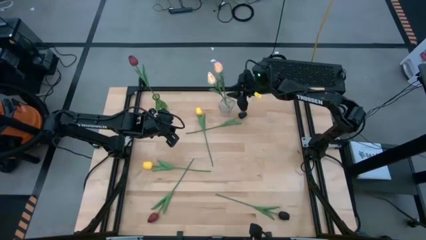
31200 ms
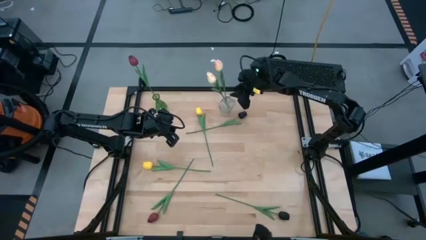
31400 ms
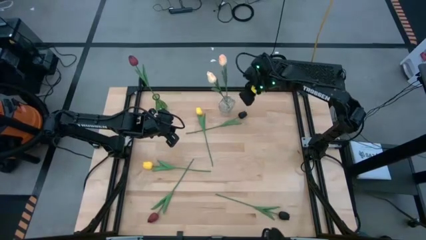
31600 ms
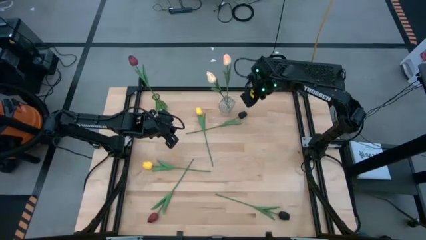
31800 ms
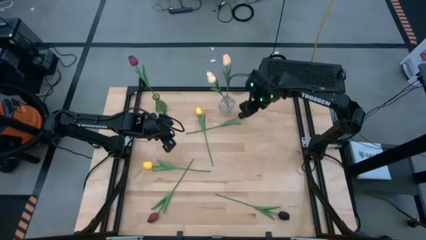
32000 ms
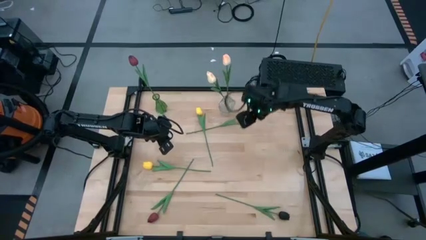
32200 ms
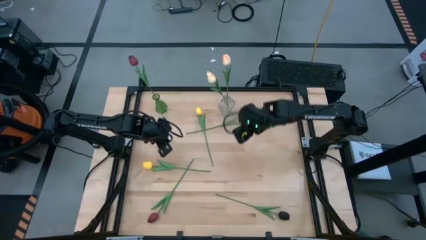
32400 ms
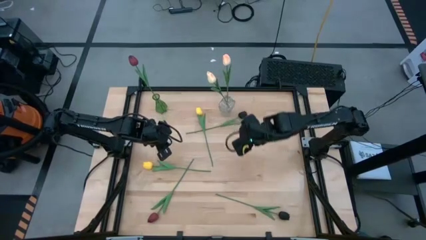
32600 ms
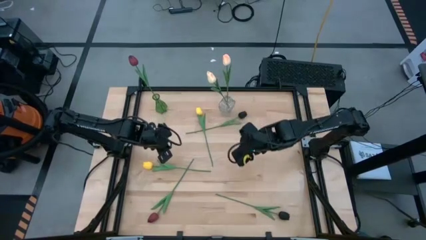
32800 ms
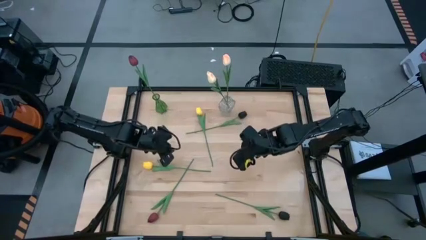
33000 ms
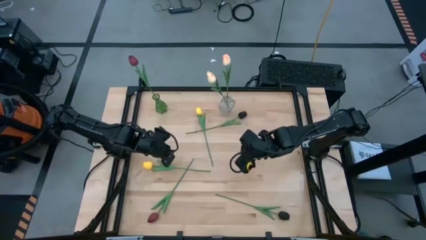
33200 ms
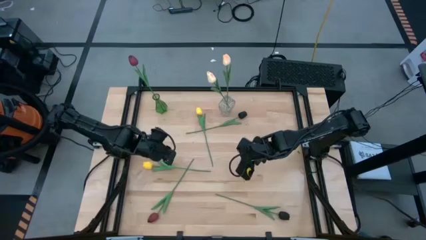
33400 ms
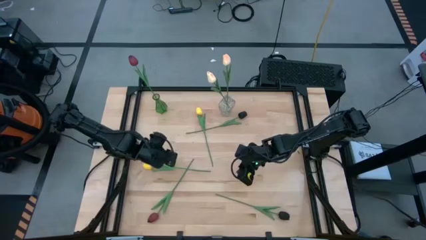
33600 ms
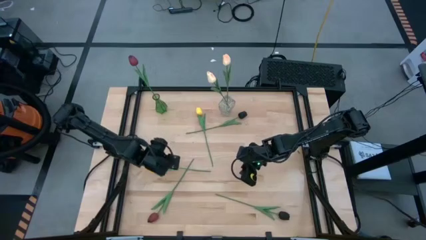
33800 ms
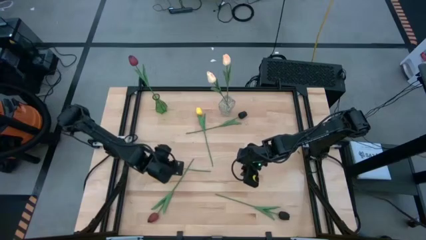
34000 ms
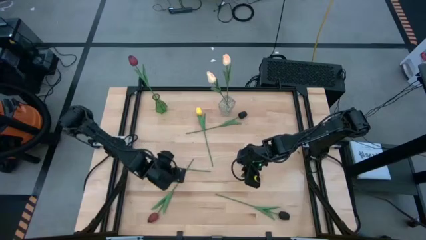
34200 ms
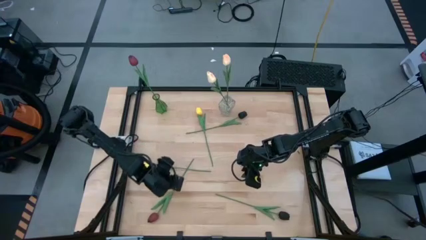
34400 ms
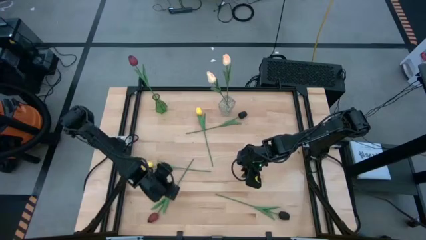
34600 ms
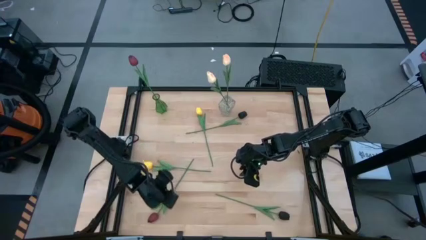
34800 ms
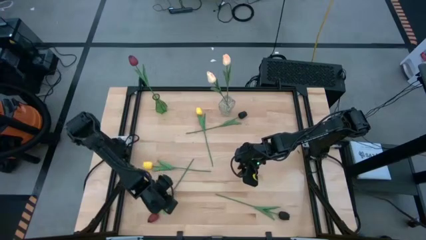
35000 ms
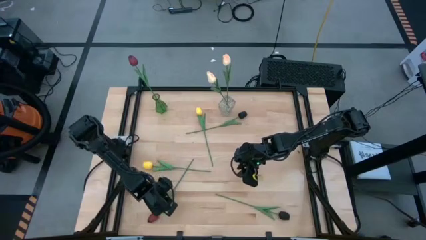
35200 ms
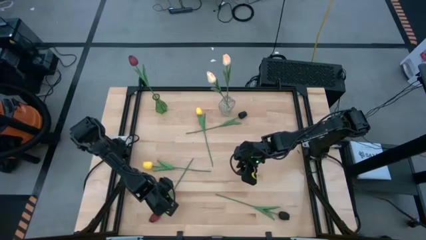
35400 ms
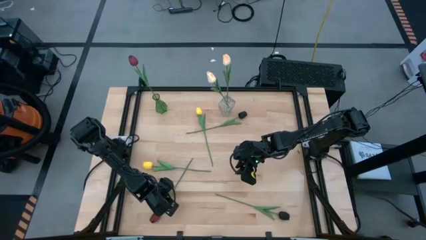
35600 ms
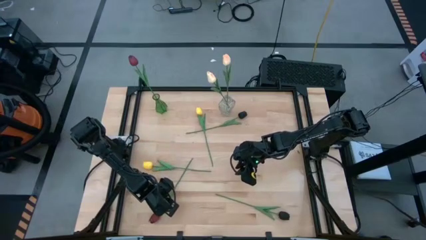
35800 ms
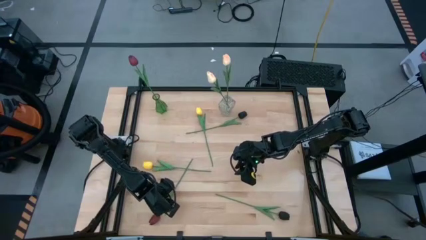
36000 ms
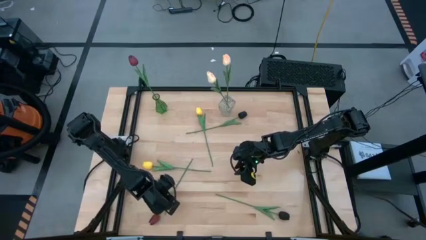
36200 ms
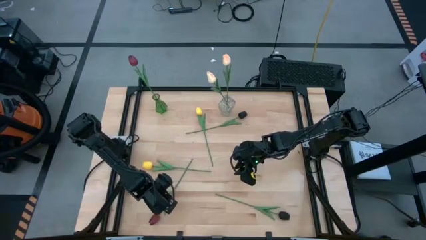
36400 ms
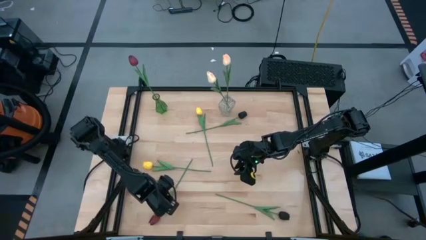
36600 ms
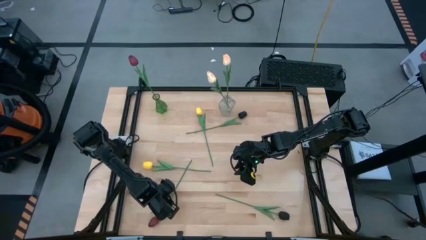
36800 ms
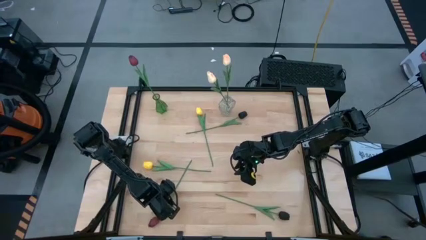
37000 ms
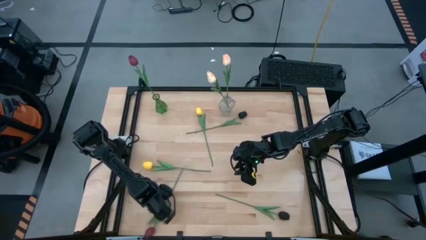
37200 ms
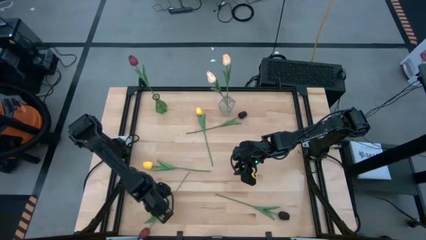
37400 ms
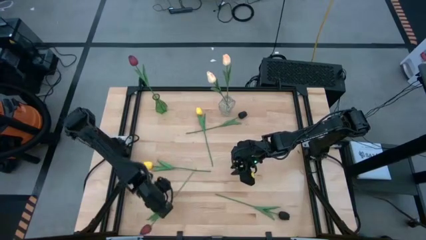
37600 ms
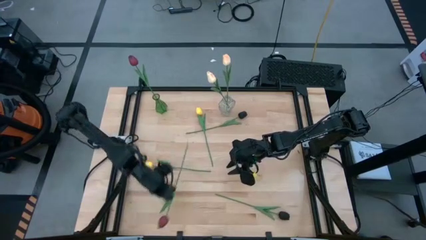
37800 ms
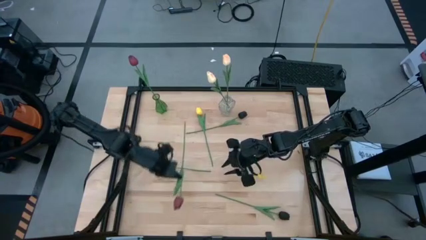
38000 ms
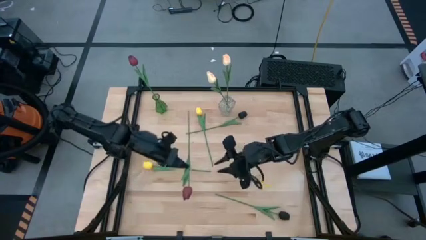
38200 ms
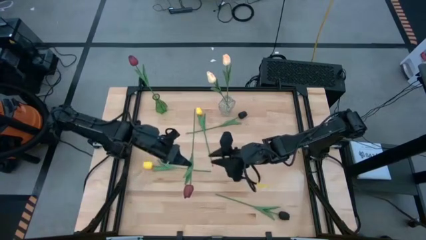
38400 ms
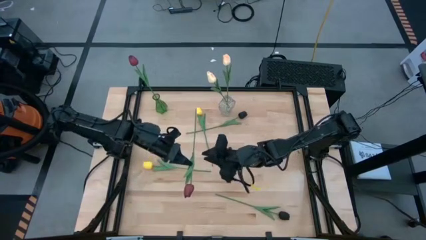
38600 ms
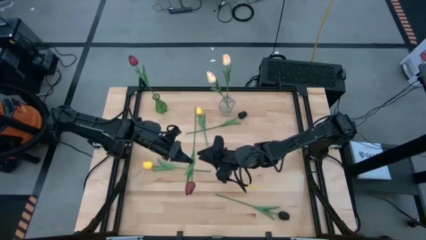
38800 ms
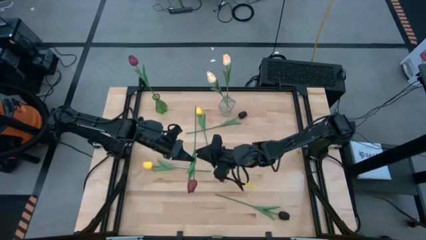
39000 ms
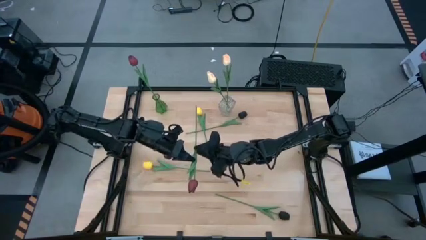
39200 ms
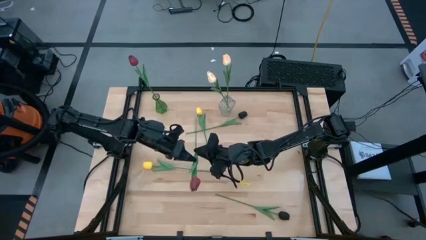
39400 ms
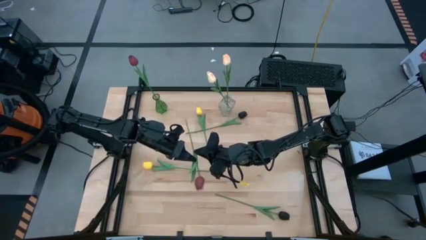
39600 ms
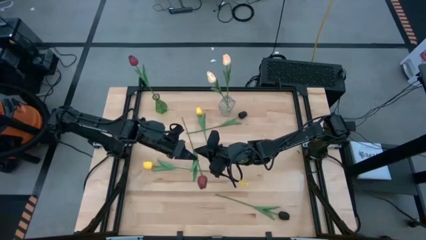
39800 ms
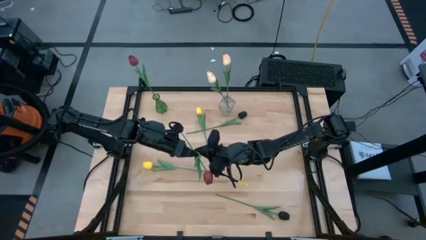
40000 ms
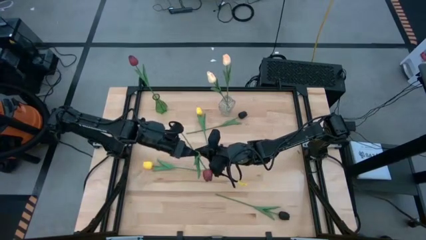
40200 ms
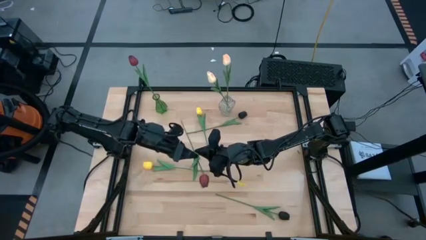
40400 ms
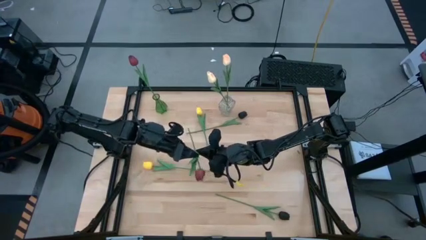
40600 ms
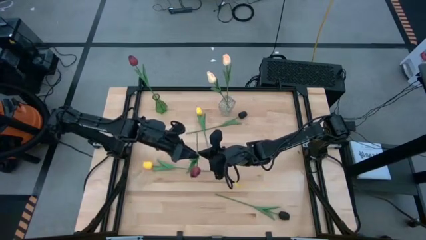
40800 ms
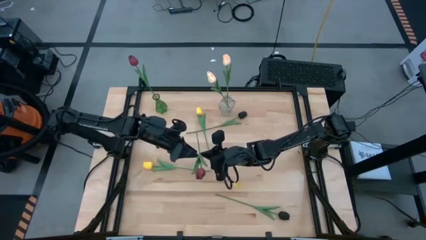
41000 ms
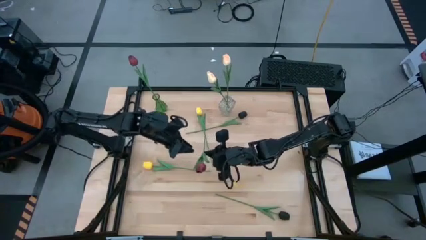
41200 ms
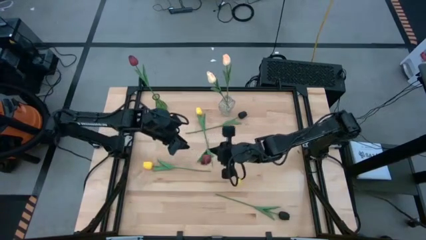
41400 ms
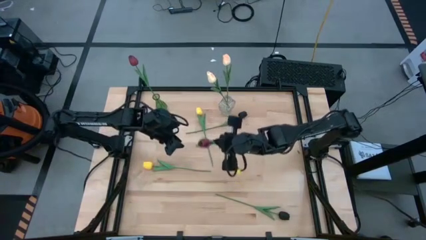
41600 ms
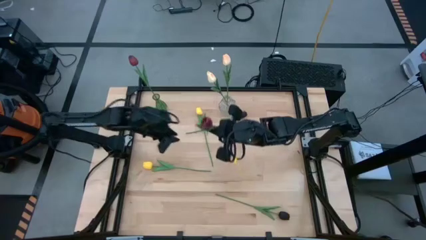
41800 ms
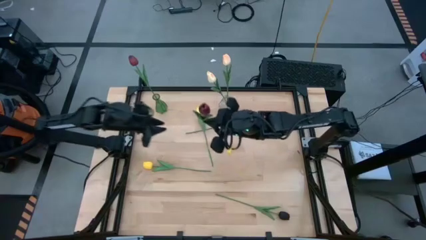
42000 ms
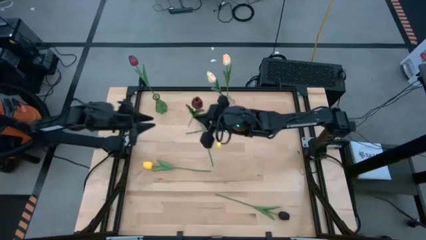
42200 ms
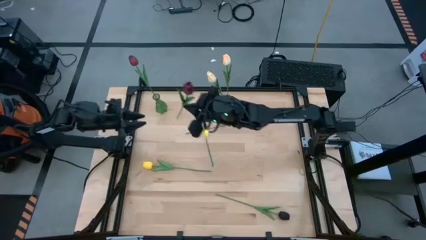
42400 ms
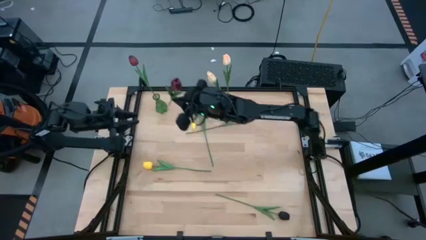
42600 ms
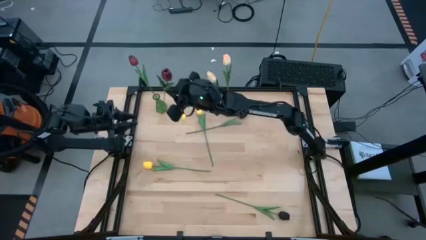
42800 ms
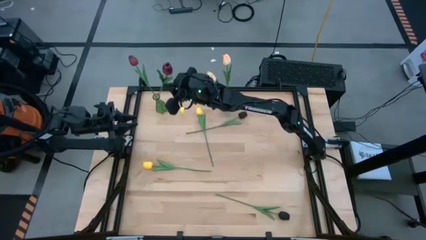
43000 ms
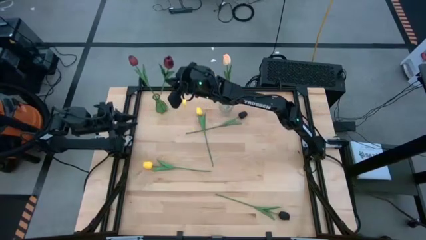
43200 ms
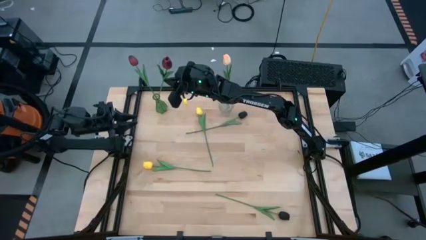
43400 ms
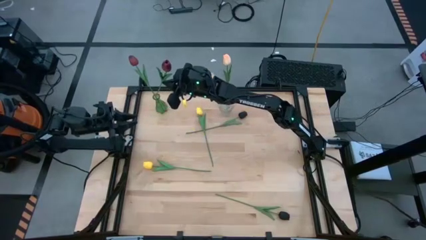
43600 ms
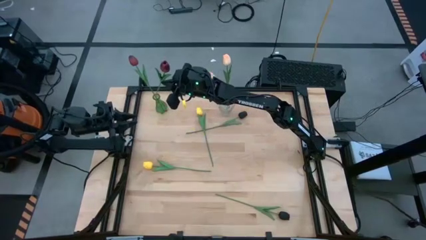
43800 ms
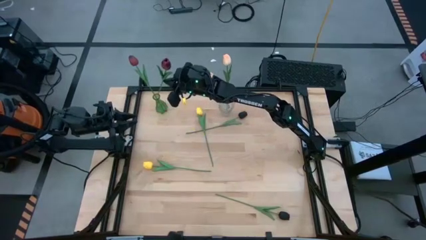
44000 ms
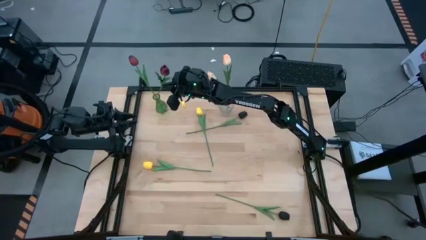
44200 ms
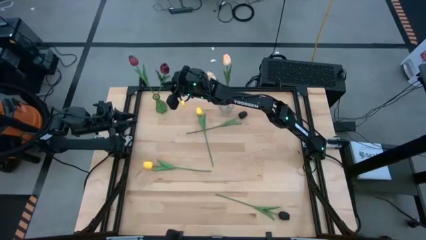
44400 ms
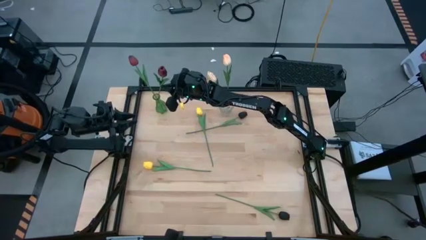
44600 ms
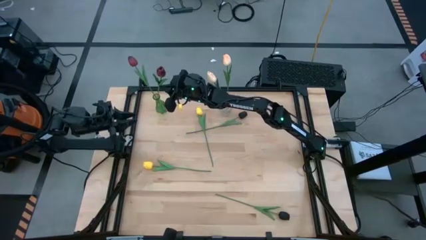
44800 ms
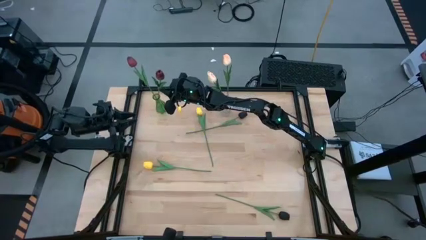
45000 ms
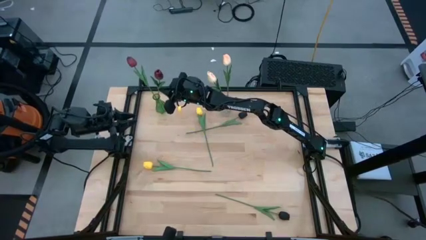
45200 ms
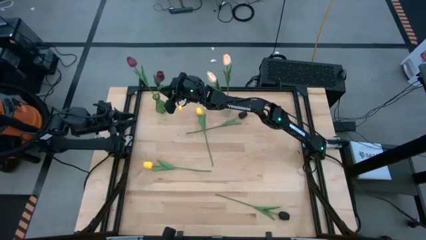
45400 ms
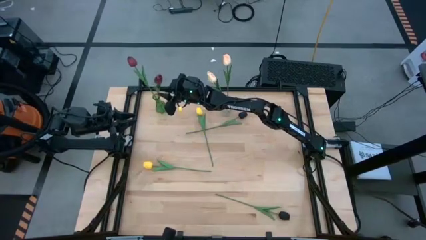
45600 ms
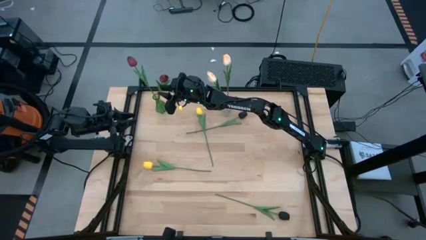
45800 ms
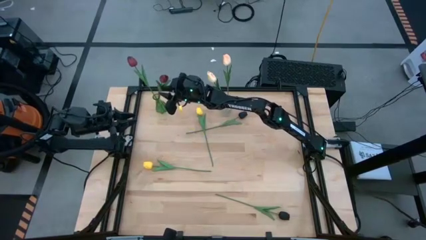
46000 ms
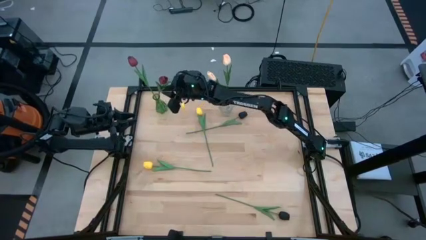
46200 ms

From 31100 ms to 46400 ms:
Task: Sort flowers into vase by color
Put the red tulip into the green vase
